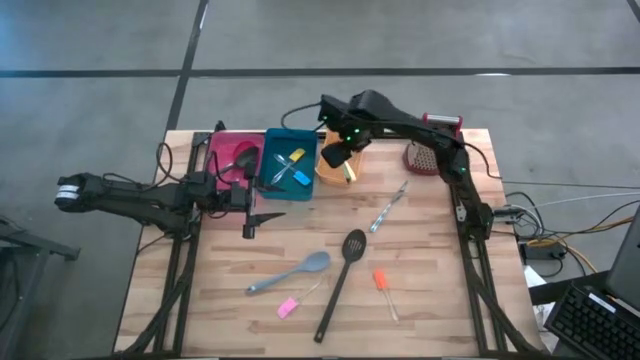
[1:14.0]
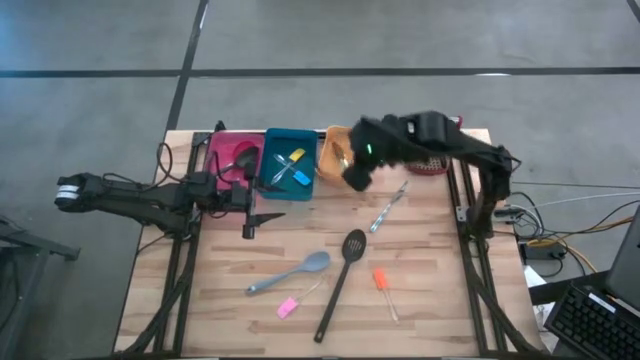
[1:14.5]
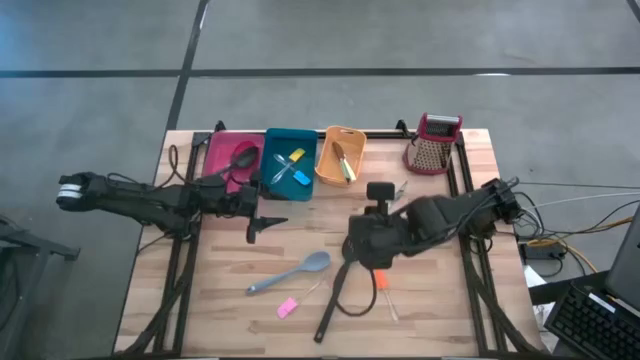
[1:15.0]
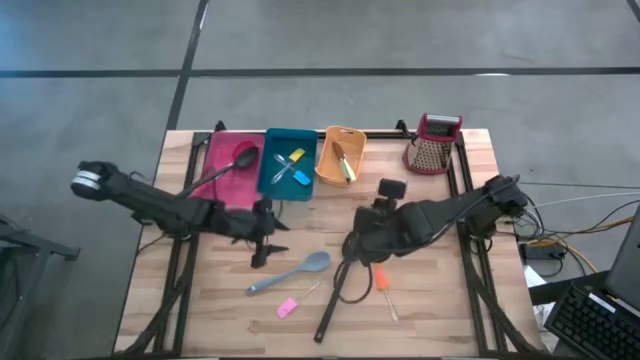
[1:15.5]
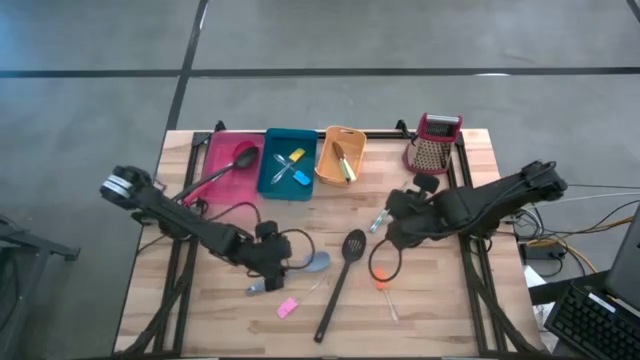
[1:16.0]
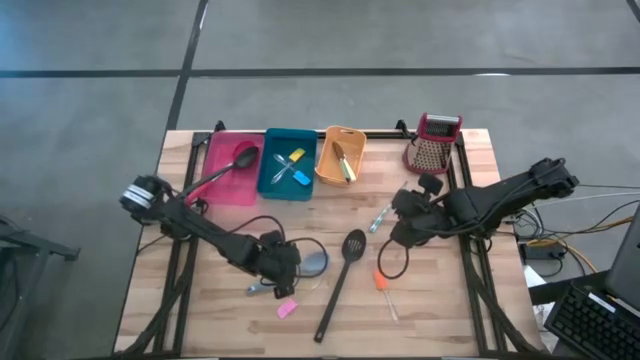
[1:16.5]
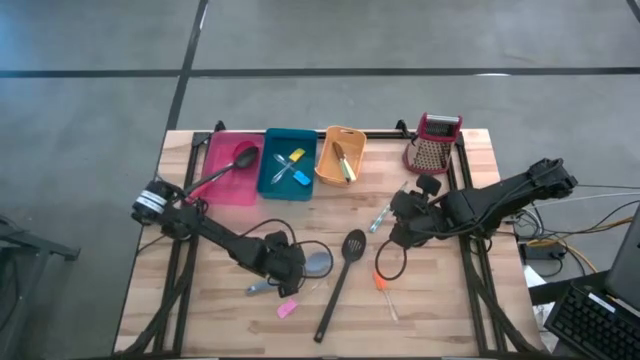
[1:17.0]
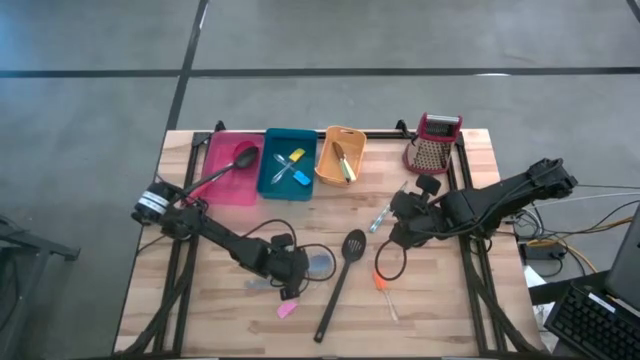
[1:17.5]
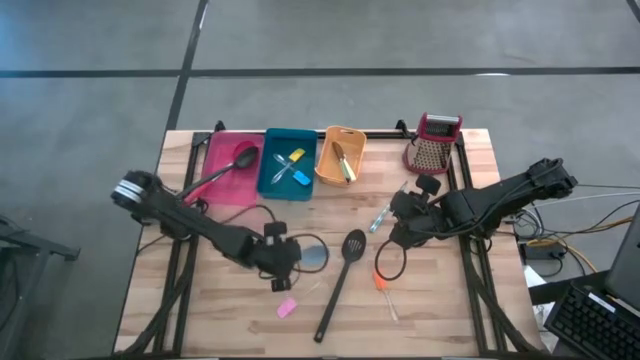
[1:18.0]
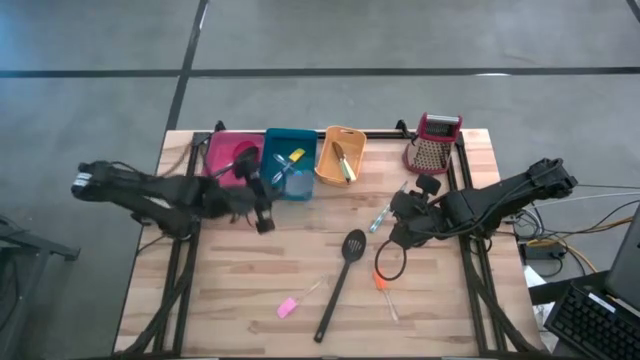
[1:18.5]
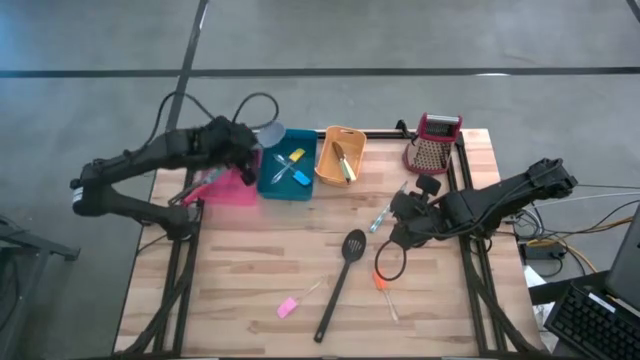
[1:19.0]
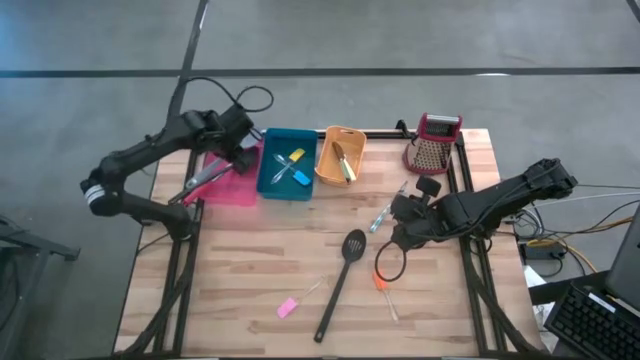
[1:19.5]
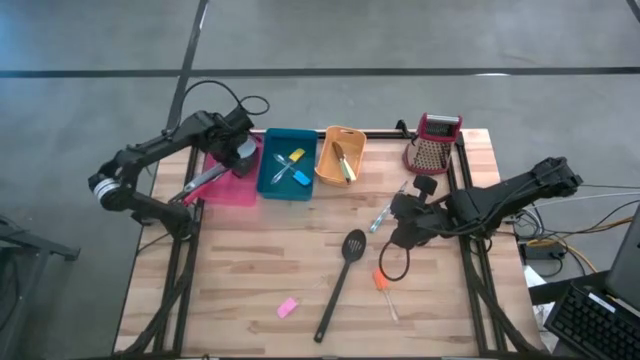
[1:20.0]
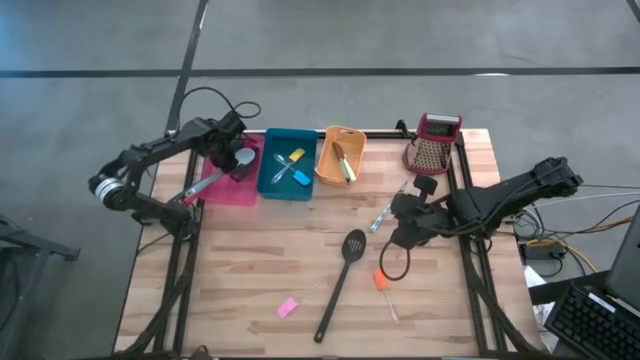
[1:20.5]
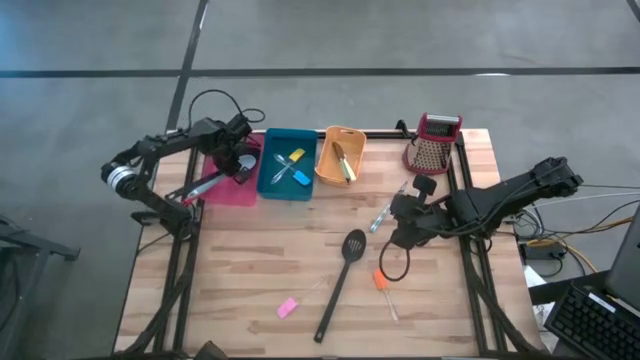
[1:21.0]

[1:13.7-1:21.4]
Task: Pick & Place Kitchen Items
Put the blue serving spoon into the pink bin

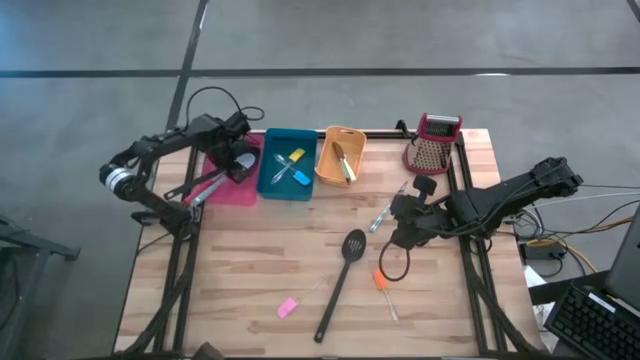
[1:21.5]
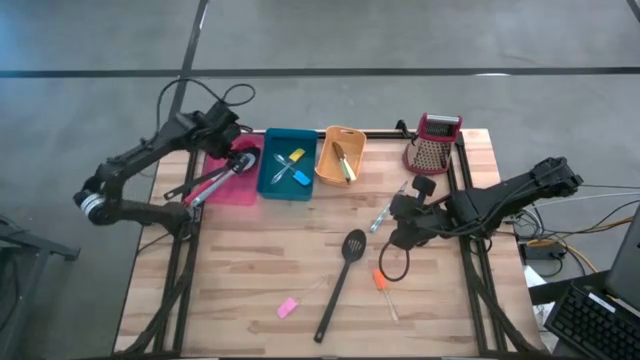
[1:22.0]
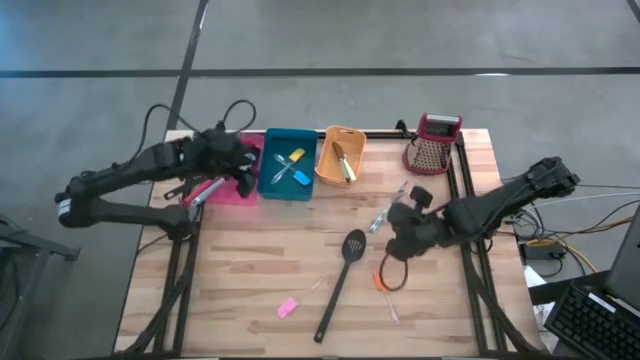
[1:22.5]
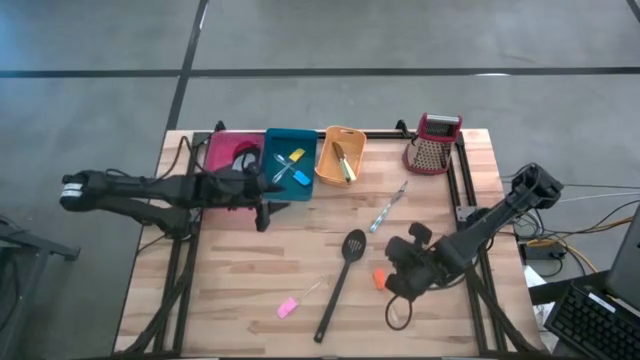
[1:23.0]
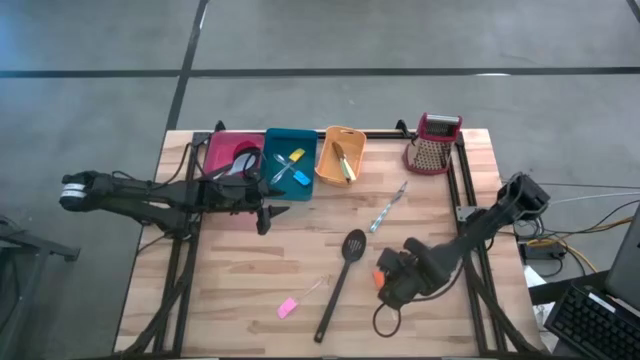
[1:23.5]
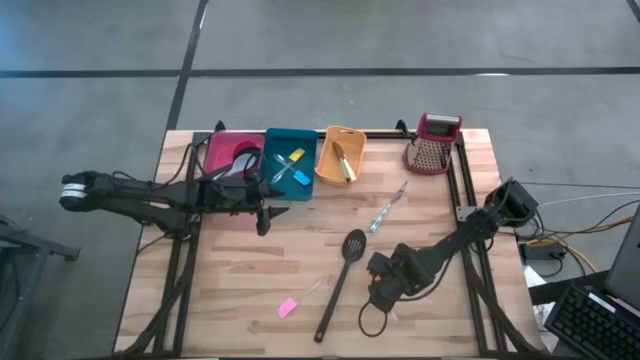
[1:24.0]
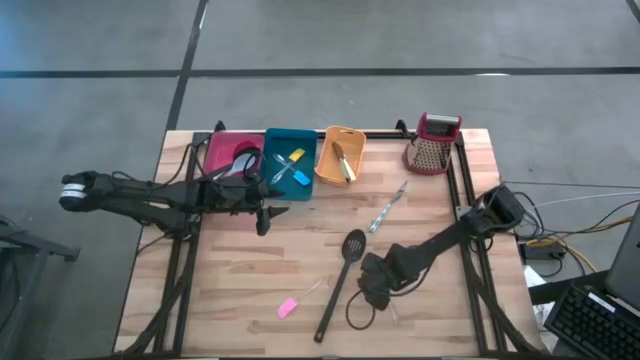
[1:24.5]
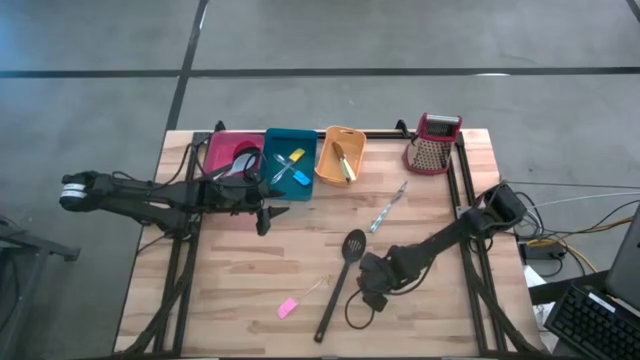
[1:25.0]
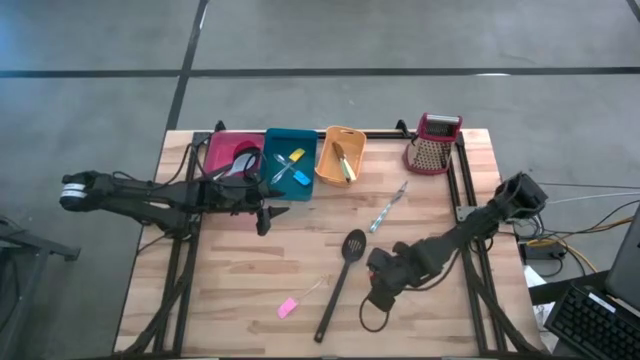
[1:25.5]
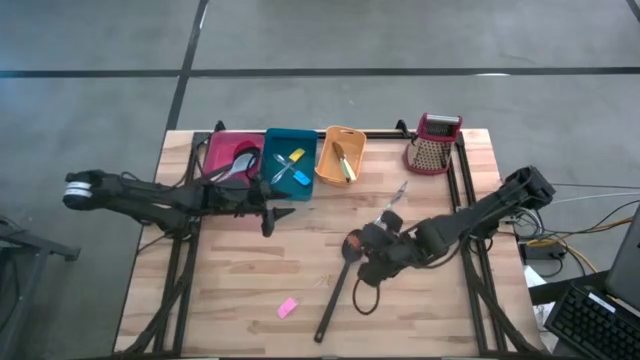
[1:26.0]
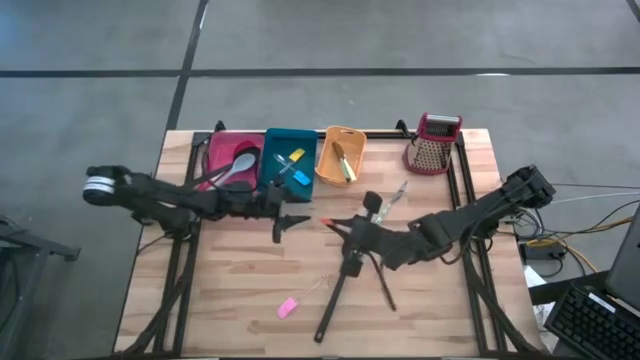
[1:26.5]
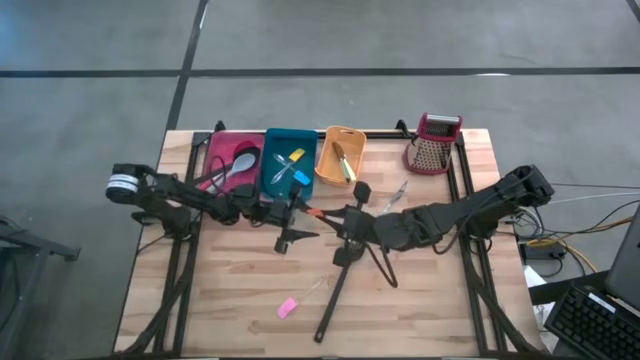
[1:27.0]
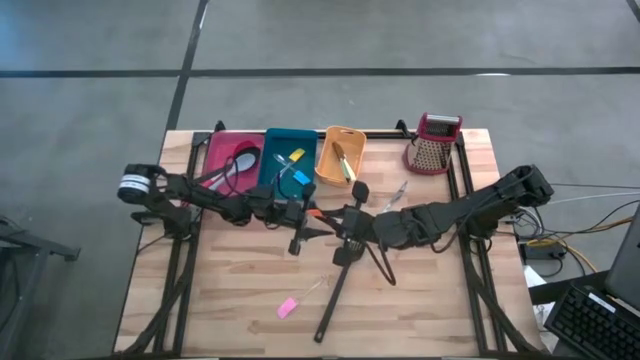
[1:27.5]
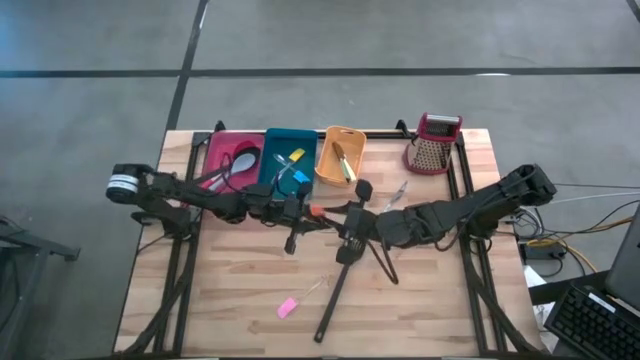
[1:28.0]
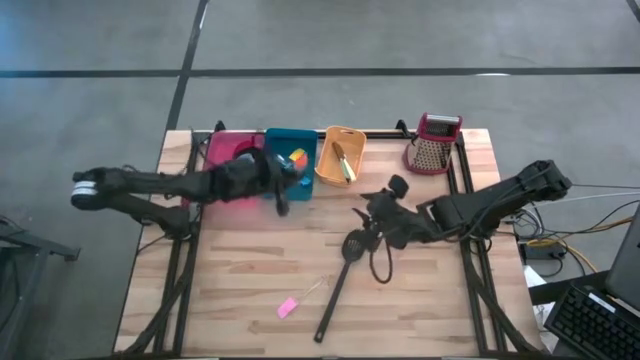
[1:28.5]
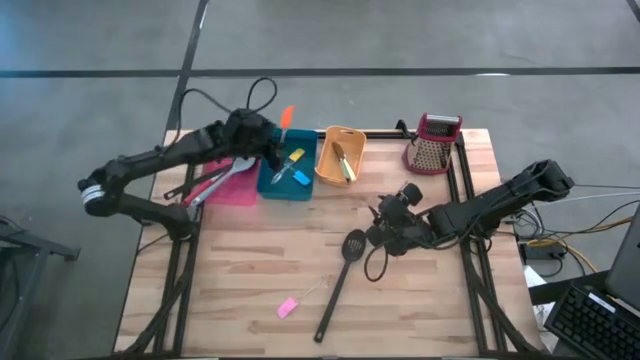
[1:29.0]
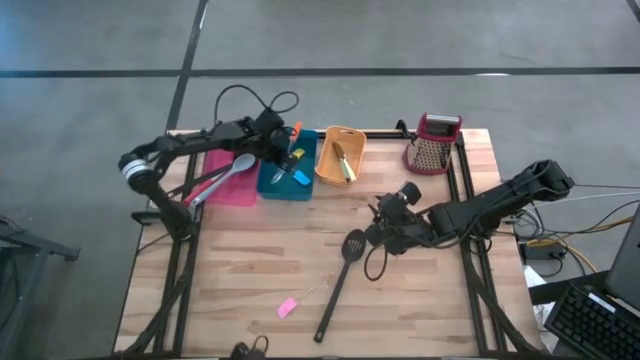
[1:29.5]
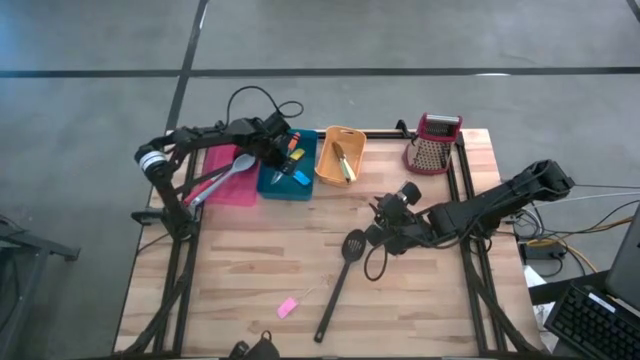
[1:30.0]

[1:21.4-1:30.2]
Put the orange spatula into the blue bin

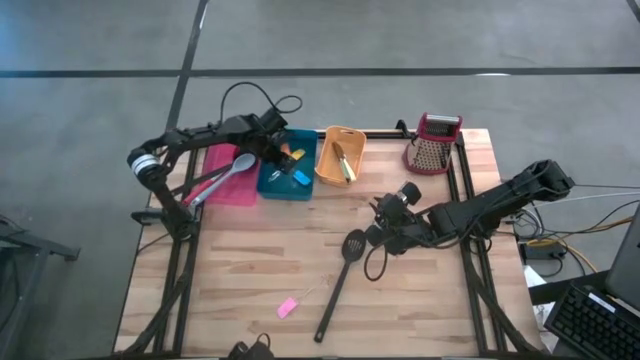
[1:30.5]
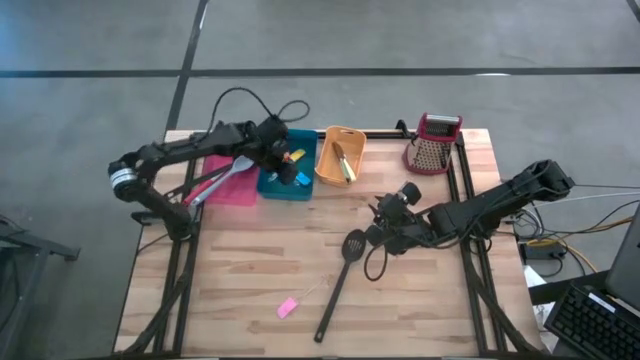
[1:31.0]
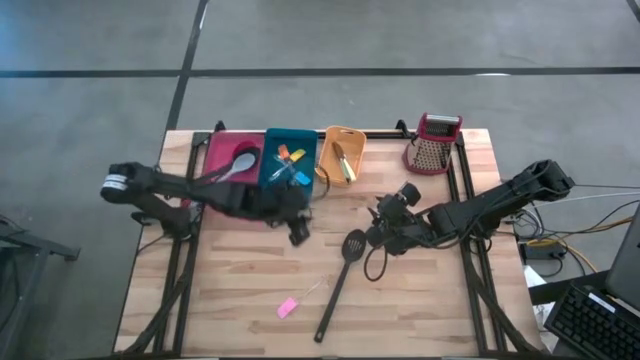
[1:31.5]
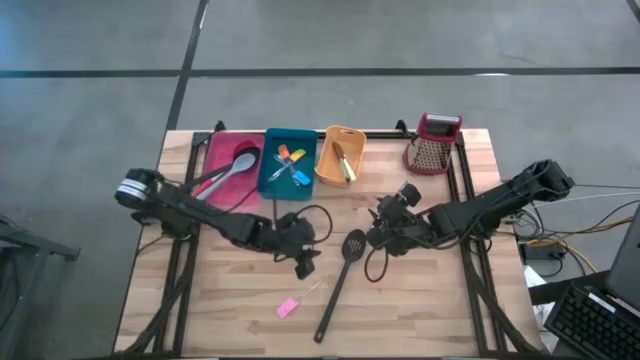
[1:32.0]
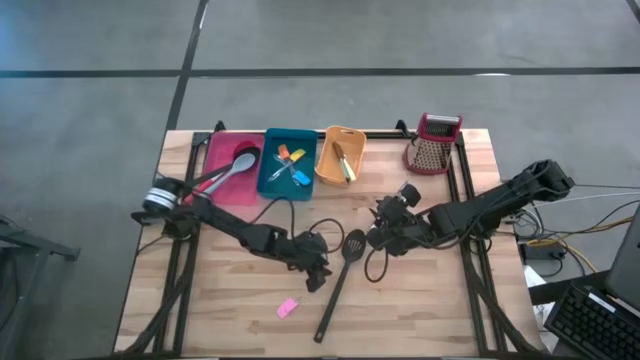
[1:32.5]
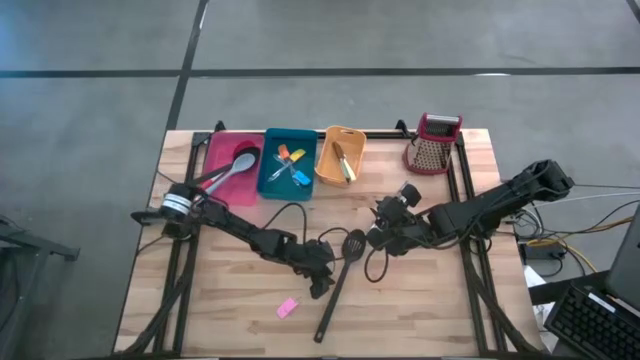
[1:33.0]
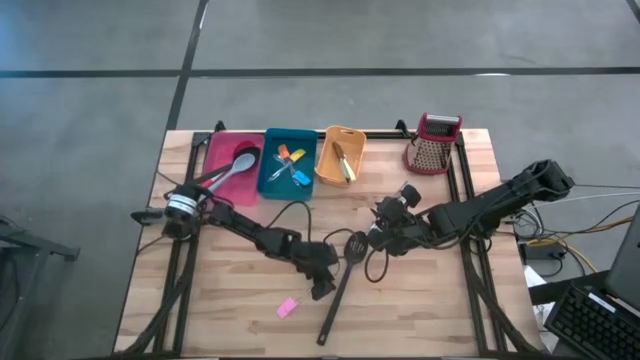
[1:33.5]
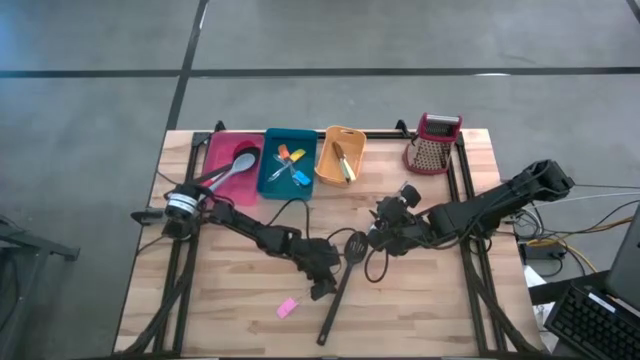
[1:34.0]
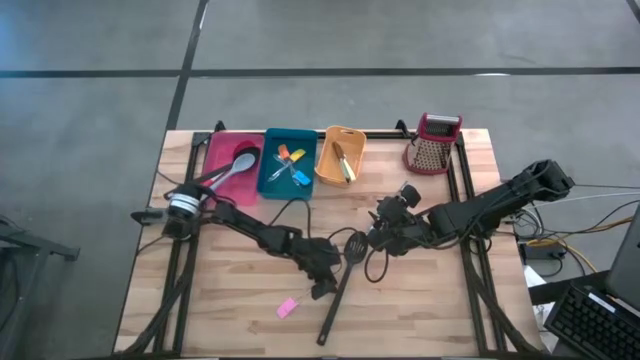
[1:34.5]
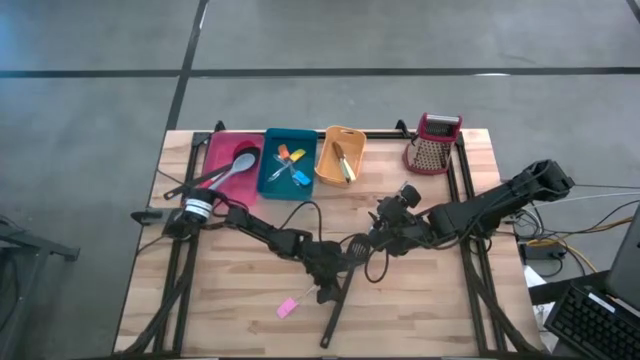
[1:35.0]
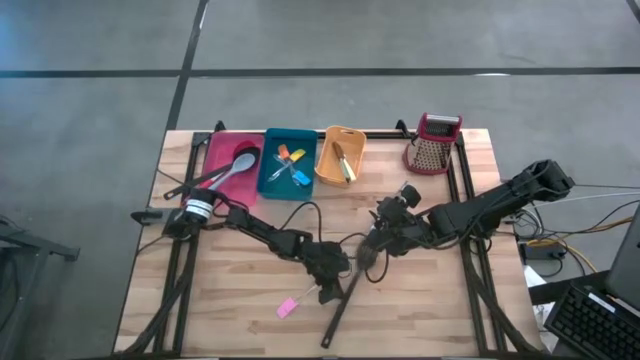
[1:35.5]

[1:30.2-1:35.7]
Put the black serving spoon into the pink bin
